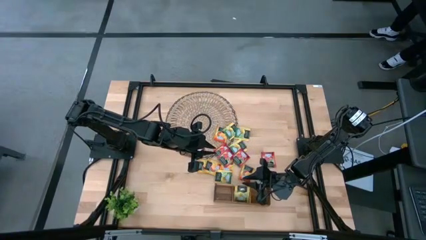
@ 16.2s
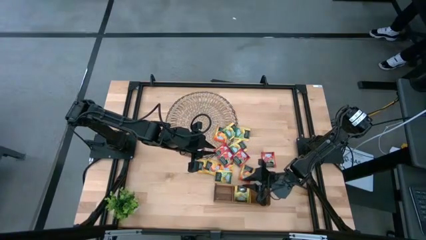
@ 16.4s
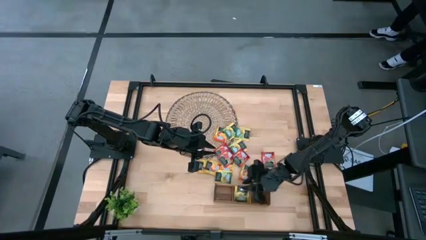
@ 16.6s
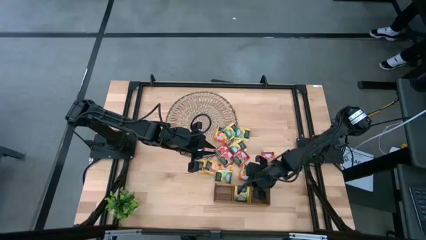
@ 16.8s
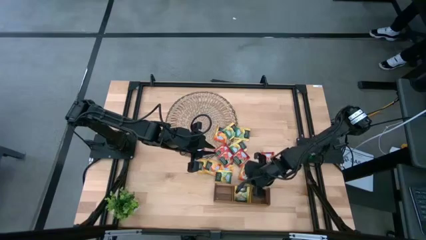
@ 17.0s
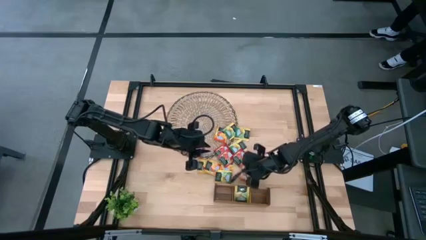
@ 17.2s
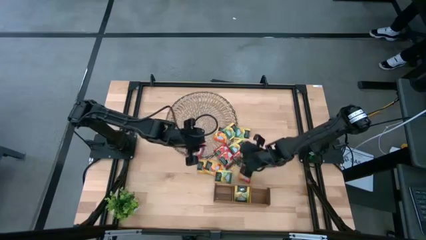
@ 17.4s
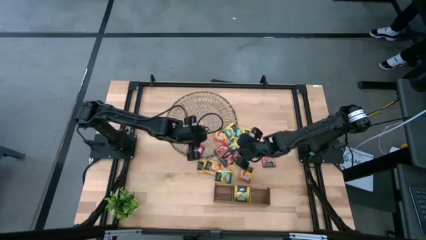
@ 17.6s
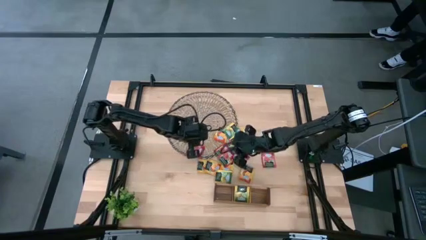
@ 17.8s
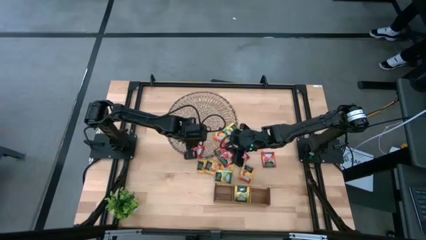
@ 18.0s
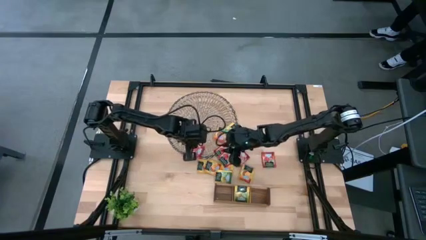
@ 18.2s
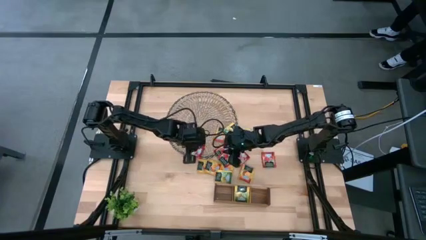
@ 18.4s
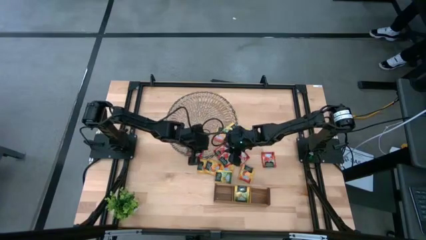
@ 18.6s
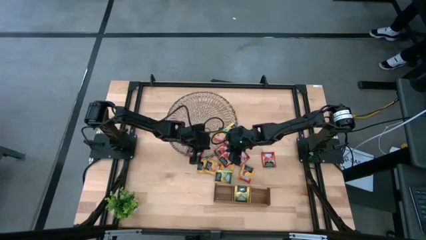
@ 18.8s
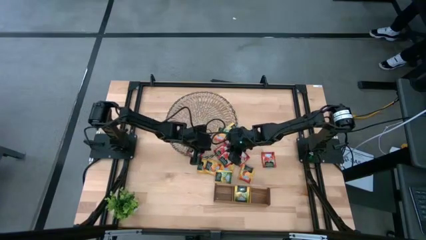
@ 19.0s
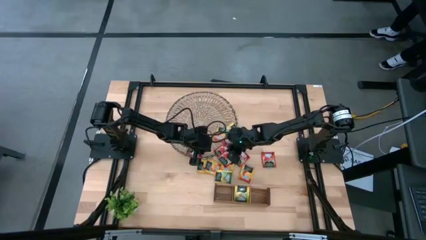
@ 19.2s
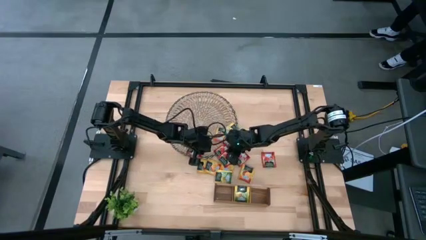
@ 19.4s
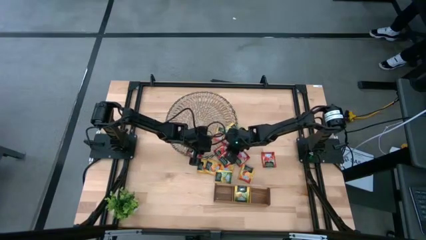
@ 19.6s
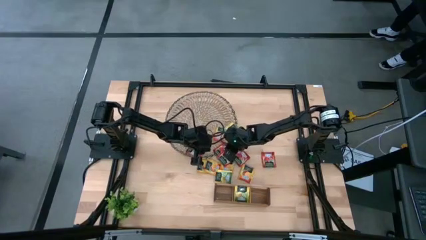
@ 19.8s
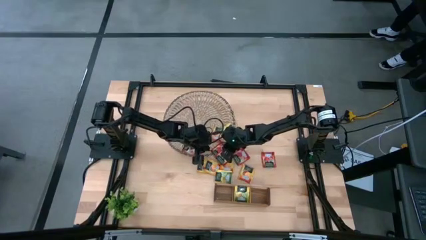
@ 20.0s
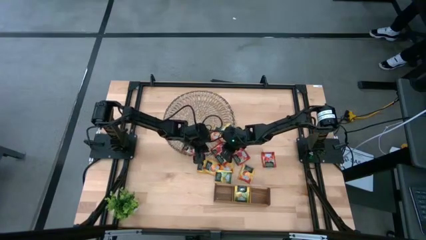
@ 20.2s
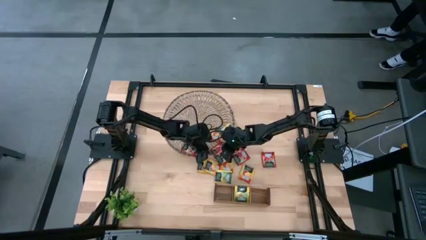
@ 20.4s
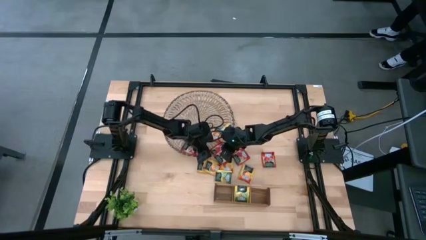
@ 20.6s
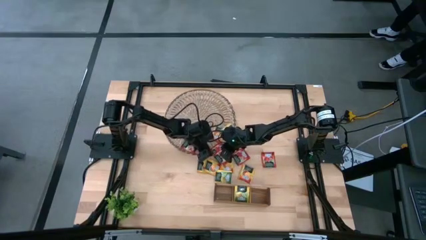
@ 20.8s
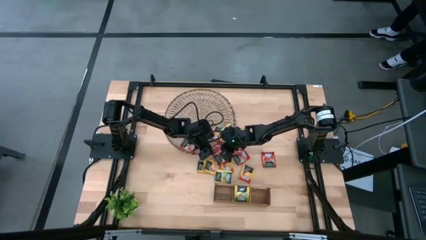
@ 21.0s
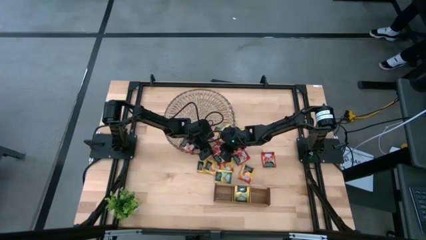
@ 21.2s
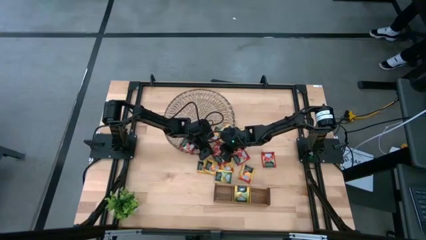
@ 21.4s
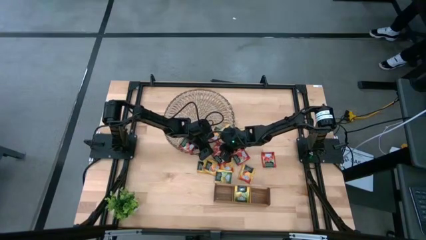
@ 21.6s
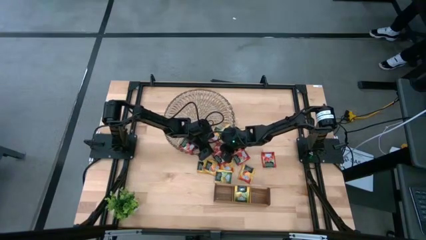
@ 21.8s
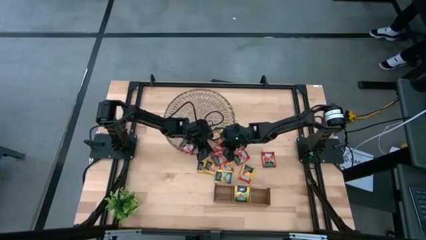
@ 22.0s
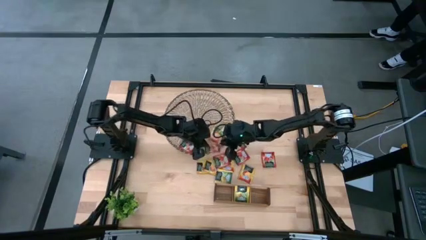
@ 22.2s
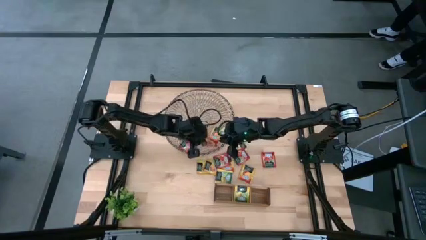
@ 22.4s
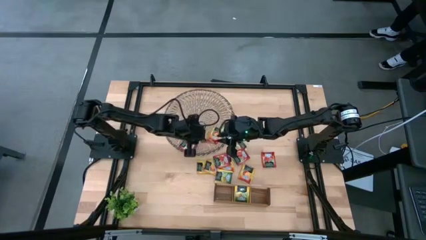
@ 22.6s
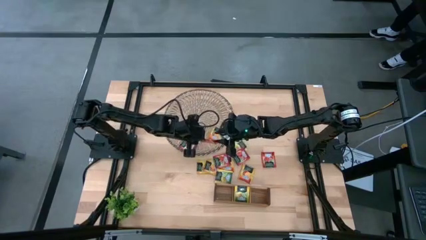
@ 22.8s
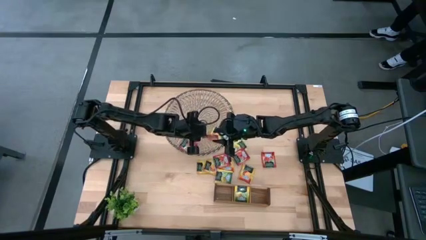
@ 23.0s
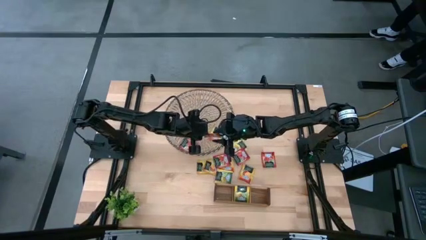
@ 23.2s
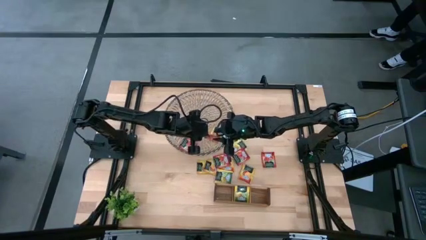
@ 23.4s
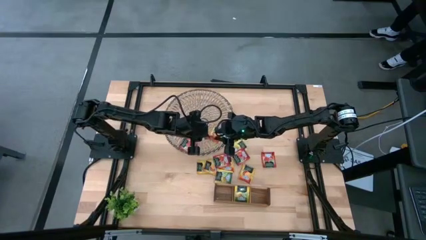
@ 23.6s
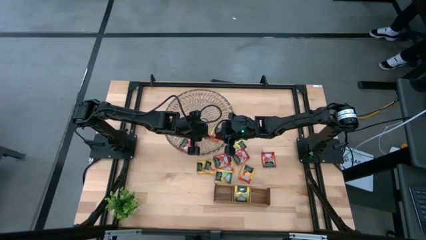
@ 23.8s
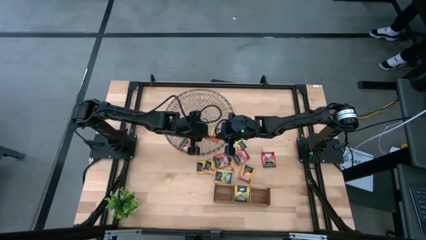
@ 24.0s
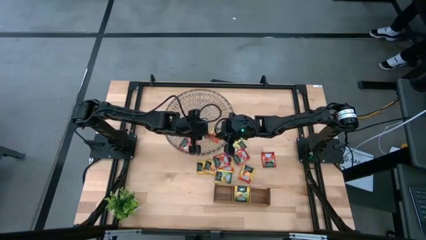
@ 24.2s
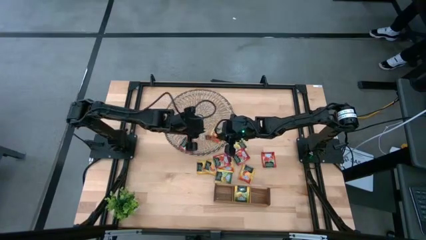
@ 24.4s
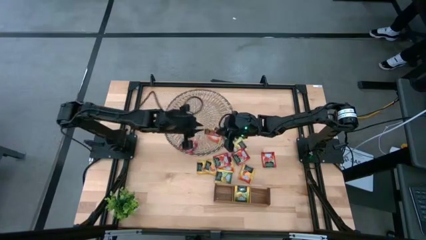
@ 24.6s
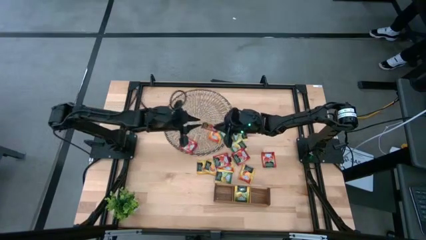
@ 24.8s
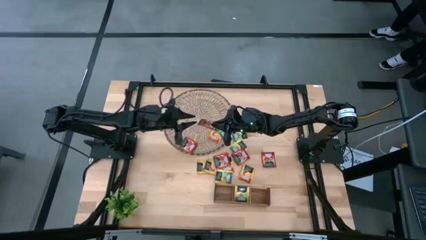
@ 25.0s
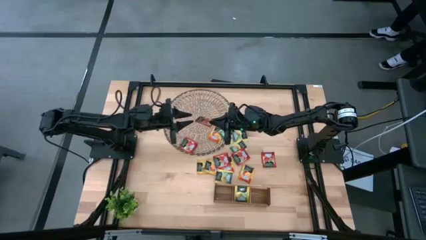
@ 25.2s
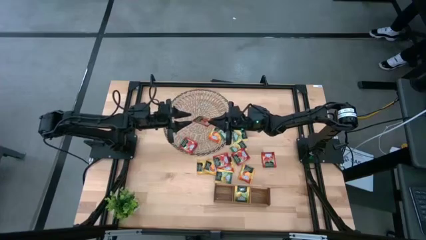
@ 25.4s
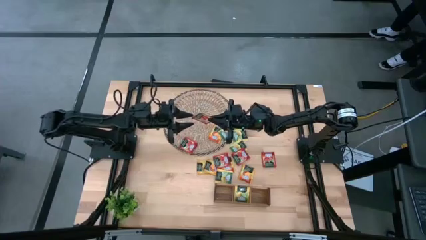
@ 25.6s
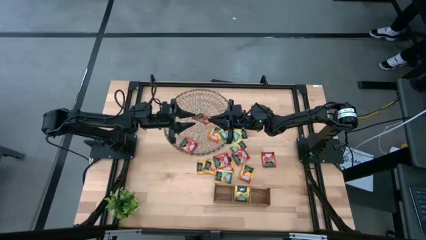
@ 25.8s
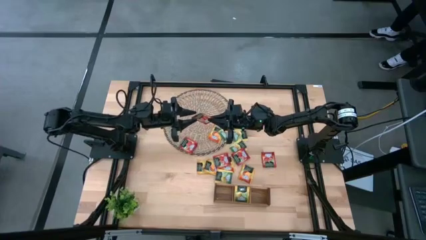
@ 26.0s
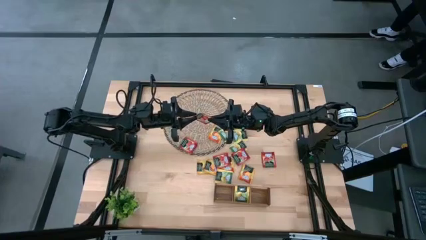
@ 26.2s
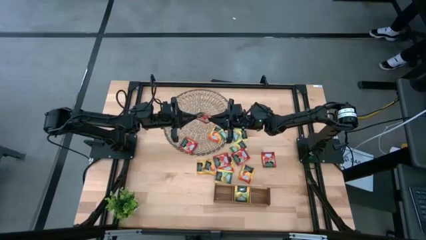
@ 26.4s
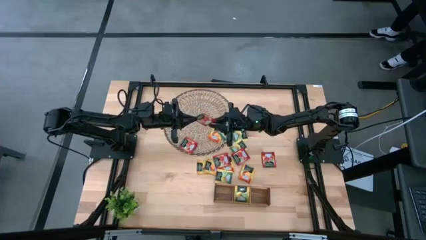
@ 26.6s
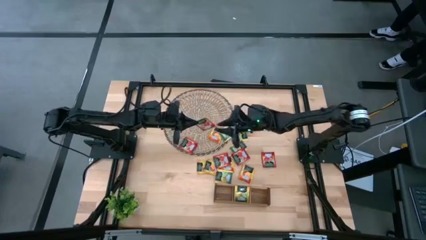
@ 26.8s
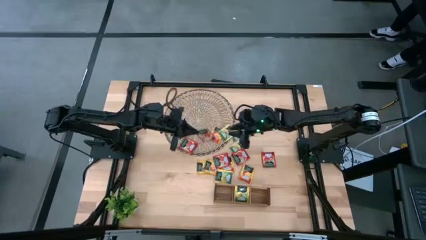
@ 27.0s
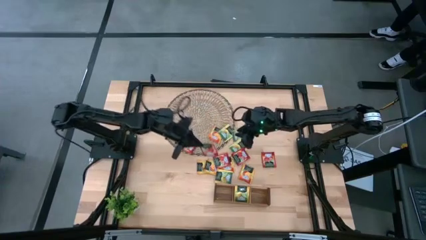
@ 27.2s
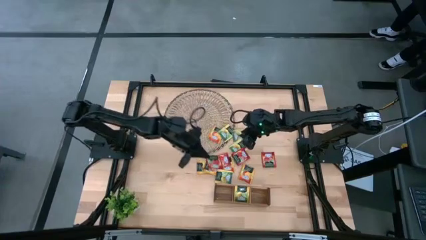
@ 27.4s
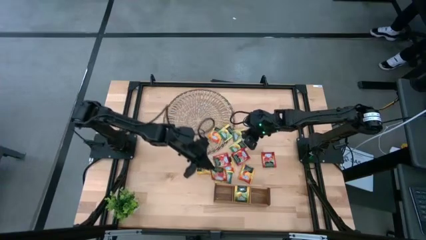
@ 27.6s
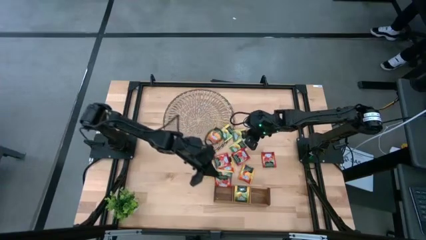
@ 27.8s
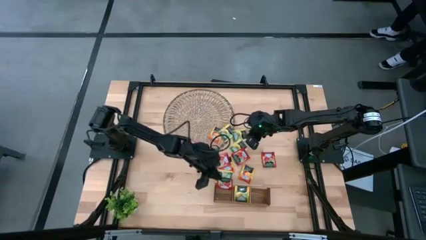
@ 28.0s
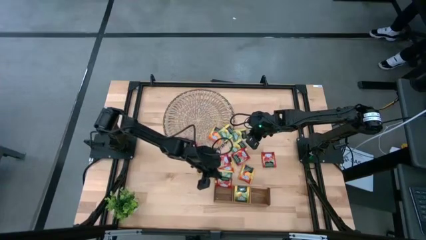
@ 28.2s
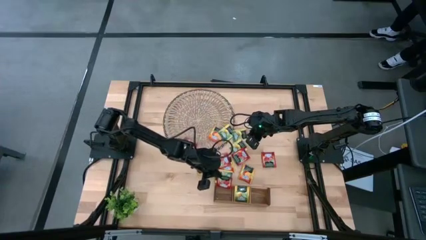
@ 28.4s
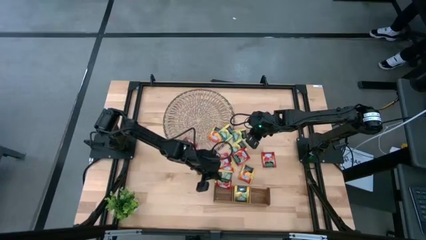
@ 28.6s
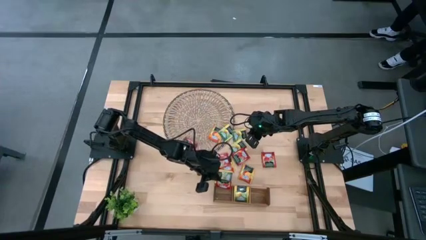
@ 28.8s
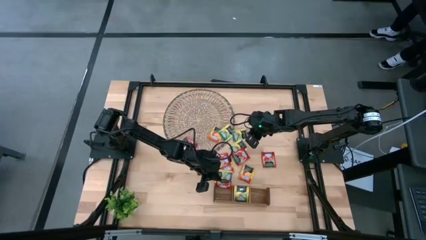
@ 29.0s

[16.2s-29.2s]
Task: Pick & Place Tea
Put the red tea bag into the left section of the wooden organizer

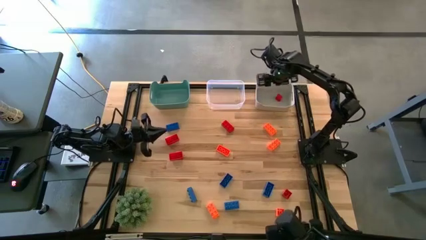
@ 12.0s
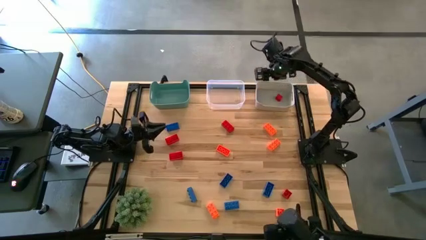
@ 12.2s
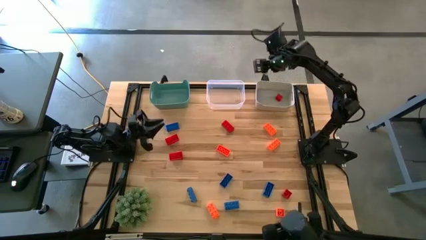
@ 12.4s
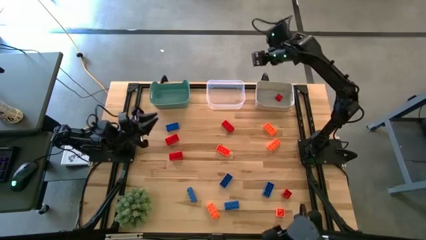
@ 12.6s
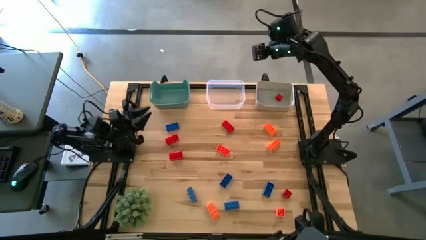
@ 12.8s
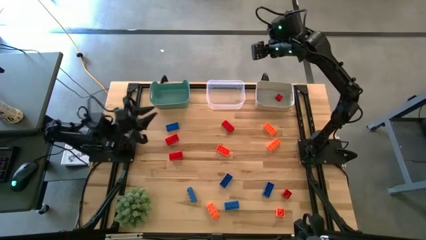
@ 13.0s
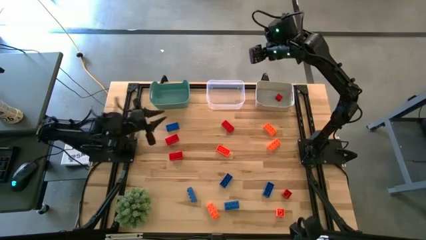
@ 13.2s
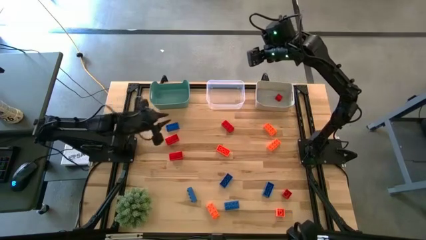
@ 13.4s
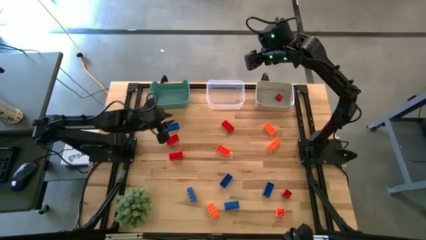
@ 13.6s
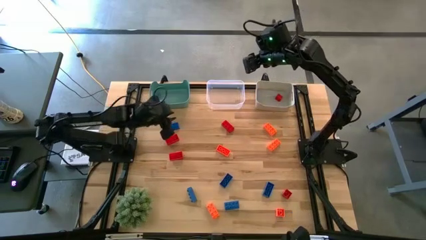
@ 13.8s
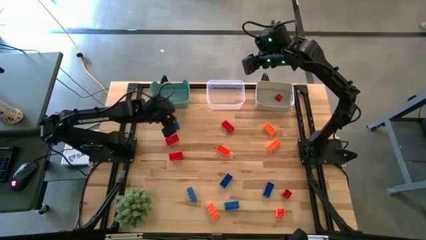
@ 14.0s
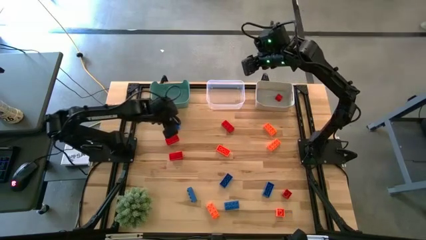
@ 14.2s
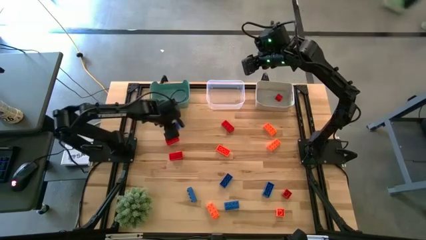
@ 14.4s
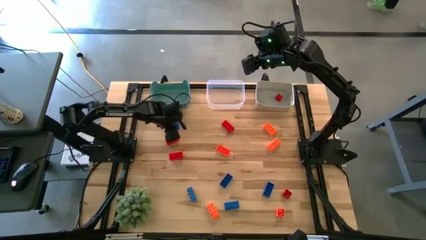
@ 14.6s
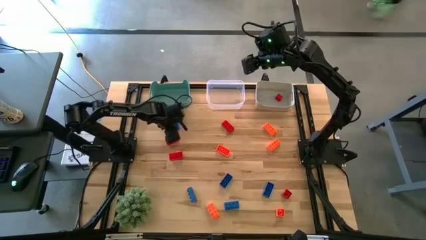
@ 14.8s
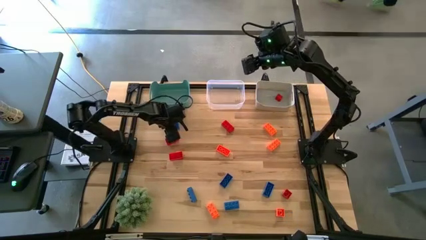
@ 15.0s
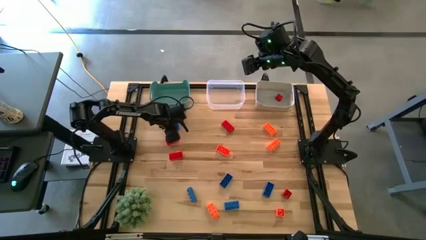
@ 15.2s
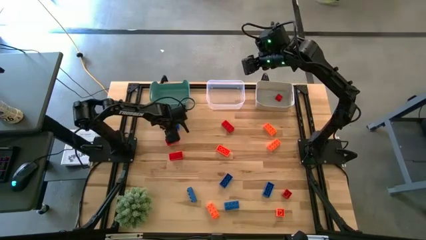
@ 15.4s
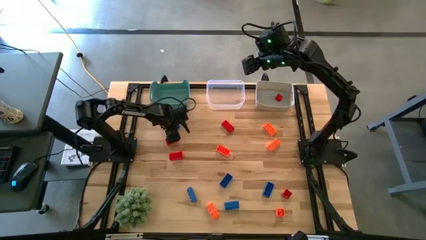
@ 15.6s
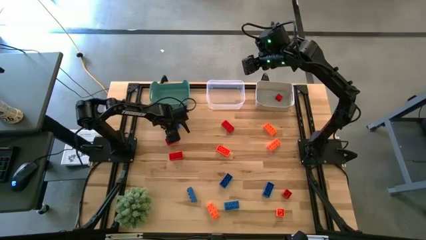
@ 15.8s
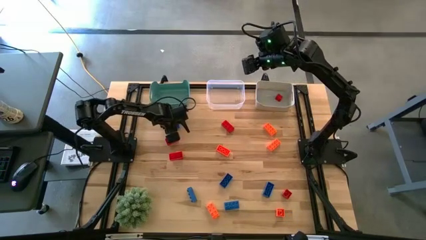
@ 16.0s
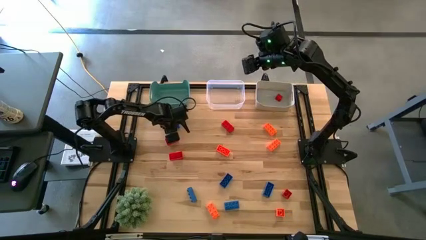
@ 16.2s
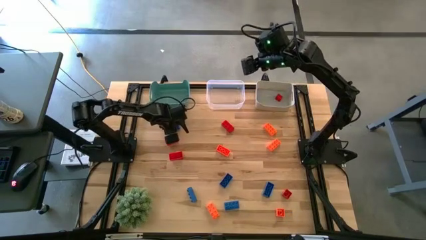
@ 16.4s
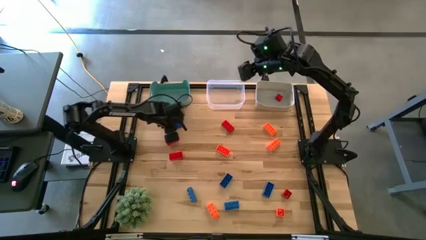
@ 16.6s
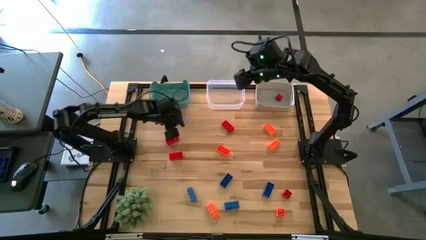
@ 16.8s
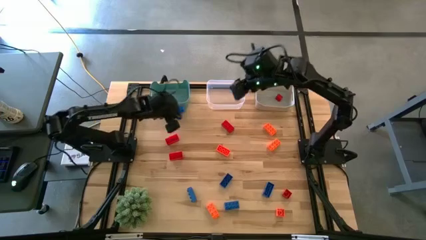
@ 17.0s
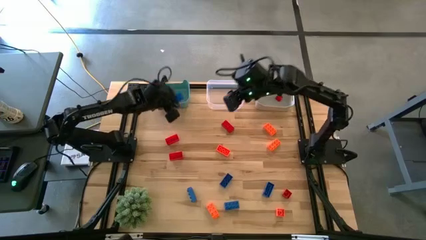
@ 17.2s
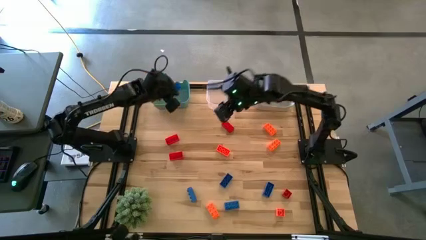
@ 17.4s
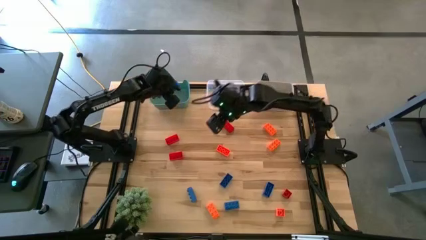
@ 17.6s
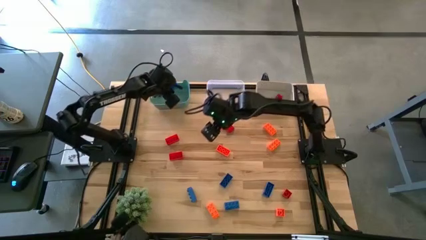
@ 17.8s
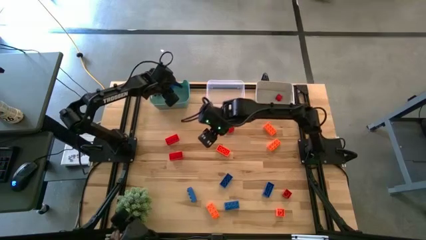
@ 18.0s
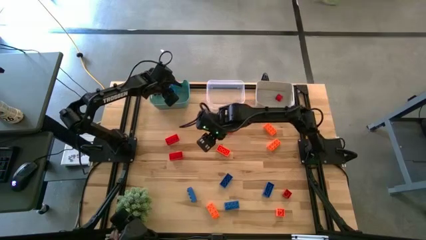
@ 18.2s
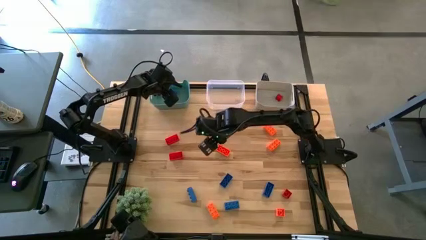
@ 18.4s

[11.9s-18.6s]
Task: Sort & place blocks by color
Put the blue game piece into the green bin
